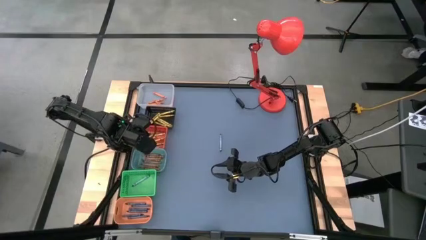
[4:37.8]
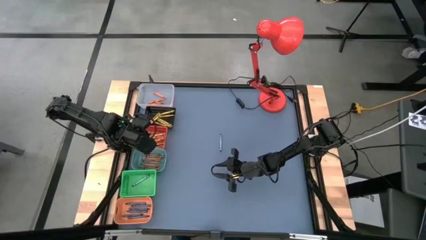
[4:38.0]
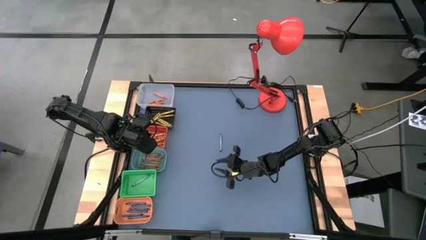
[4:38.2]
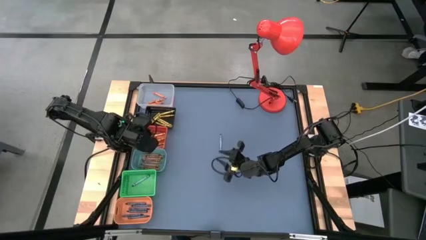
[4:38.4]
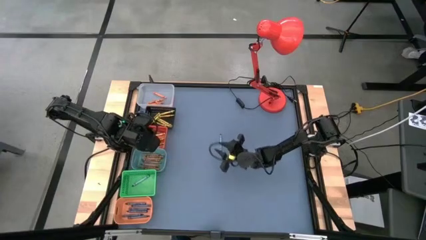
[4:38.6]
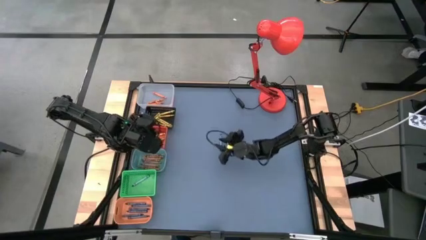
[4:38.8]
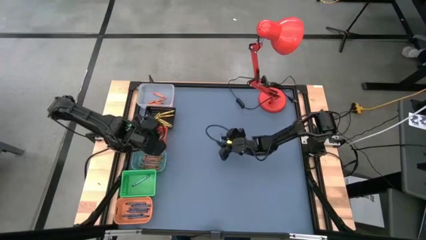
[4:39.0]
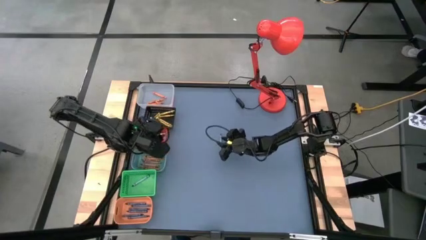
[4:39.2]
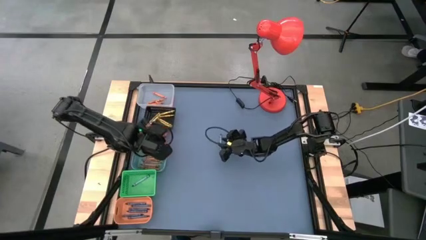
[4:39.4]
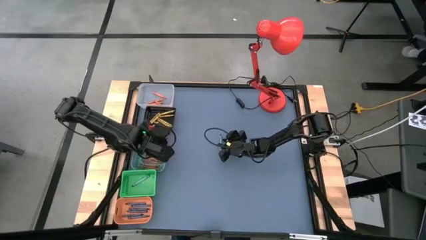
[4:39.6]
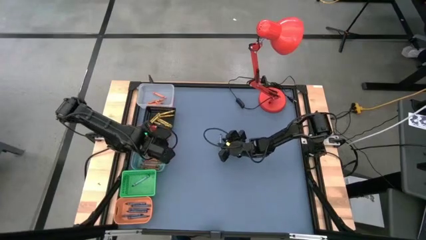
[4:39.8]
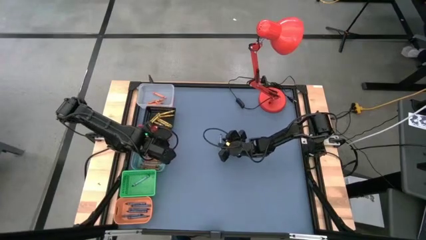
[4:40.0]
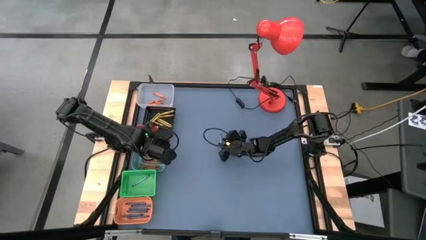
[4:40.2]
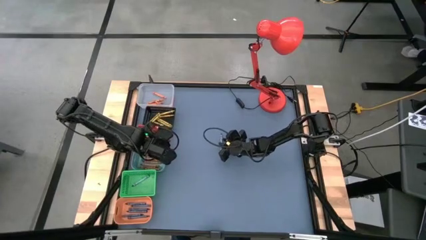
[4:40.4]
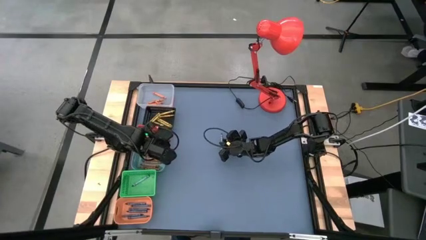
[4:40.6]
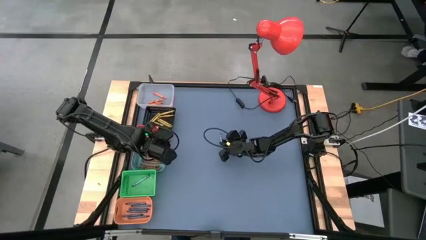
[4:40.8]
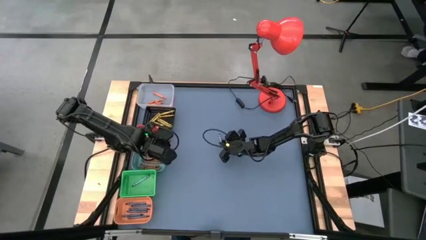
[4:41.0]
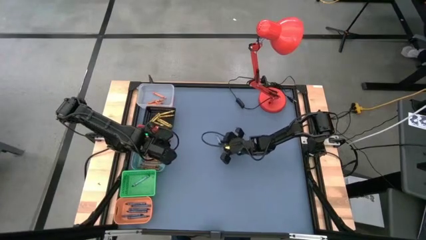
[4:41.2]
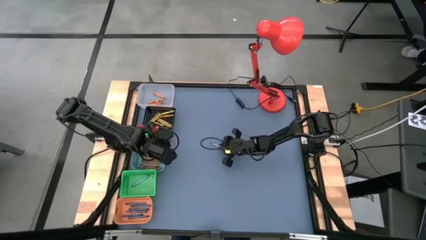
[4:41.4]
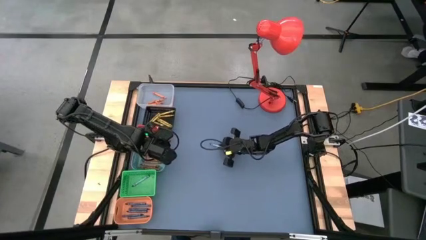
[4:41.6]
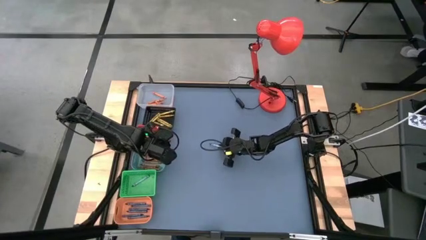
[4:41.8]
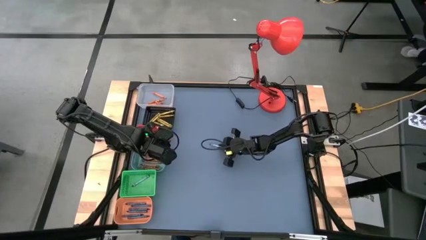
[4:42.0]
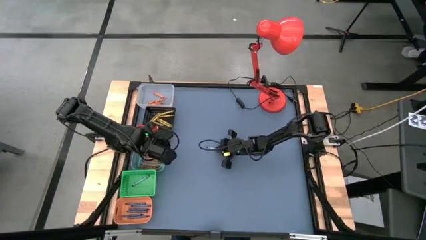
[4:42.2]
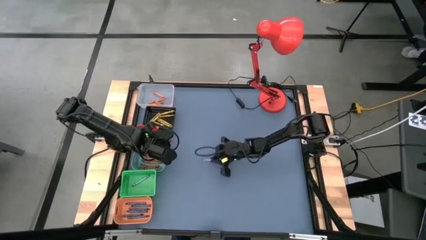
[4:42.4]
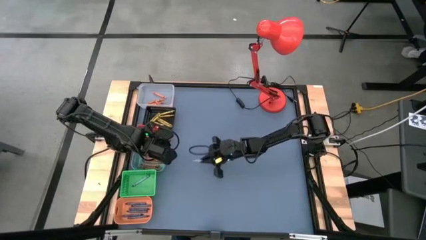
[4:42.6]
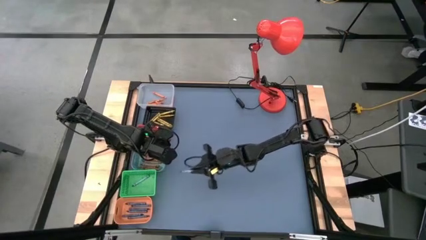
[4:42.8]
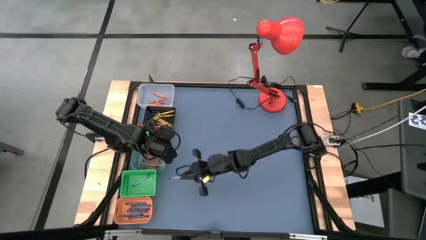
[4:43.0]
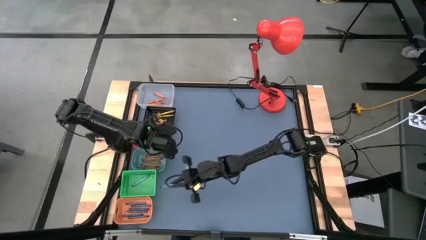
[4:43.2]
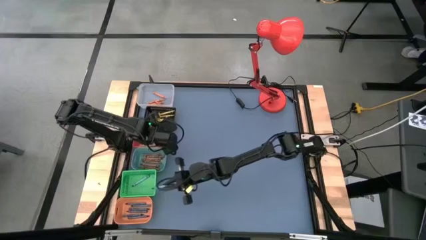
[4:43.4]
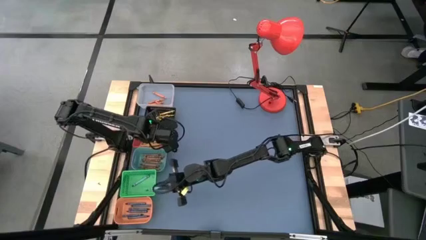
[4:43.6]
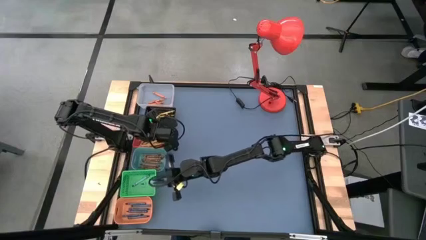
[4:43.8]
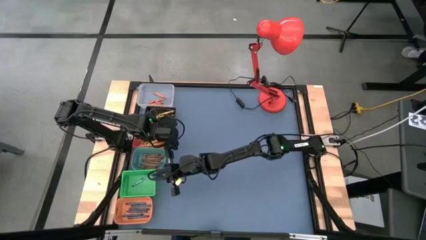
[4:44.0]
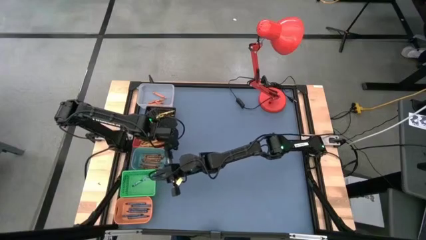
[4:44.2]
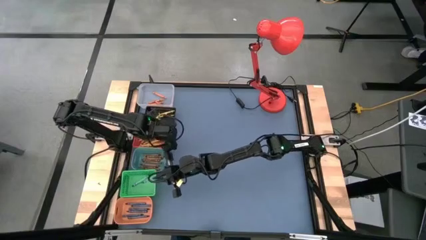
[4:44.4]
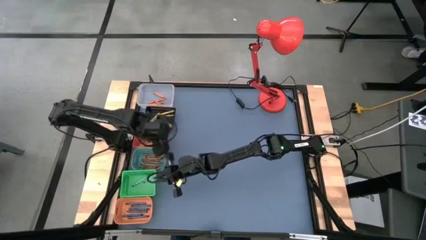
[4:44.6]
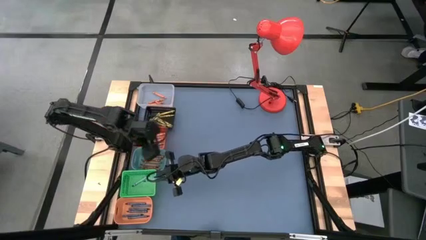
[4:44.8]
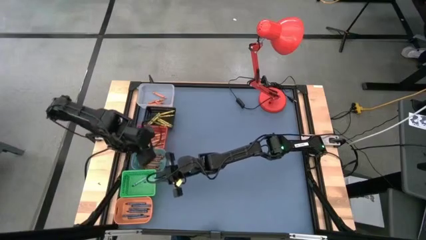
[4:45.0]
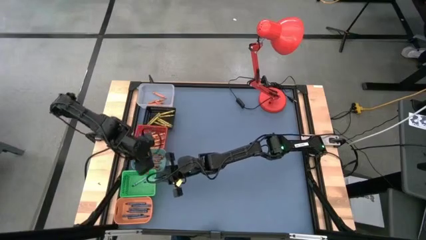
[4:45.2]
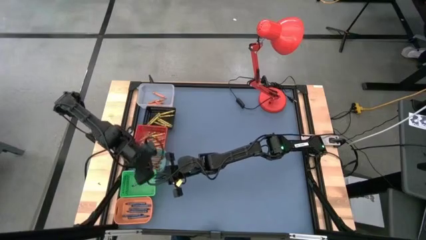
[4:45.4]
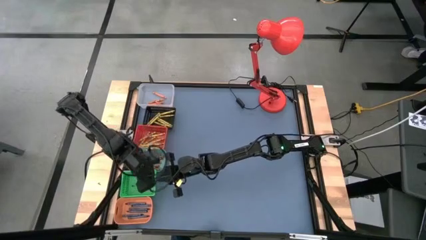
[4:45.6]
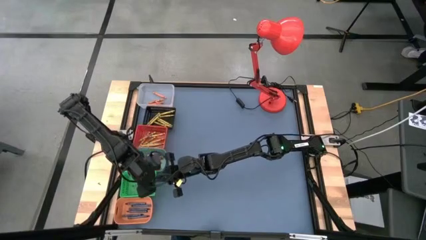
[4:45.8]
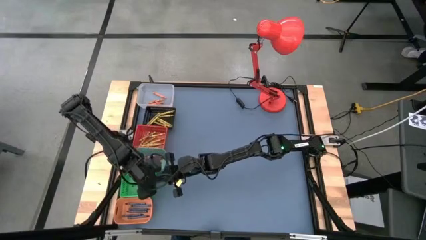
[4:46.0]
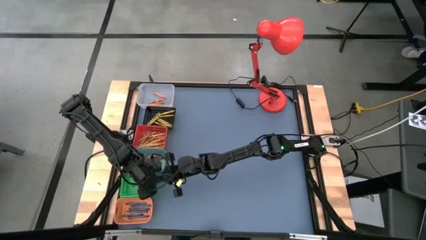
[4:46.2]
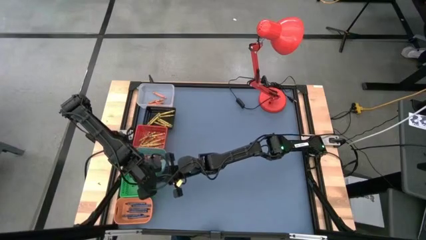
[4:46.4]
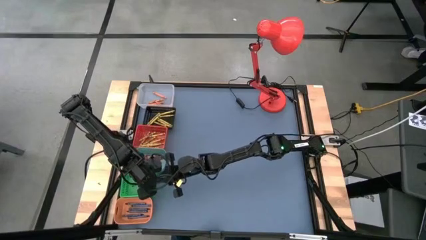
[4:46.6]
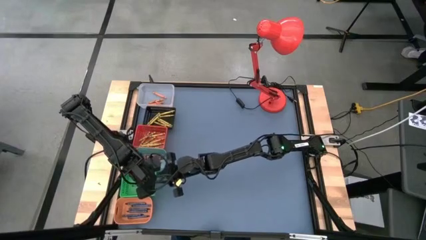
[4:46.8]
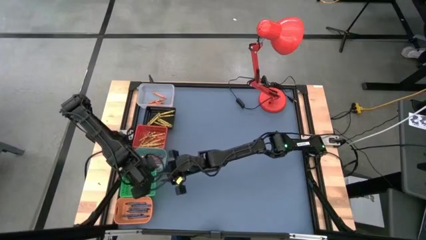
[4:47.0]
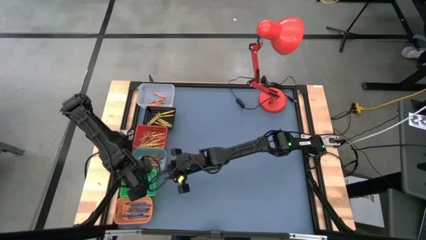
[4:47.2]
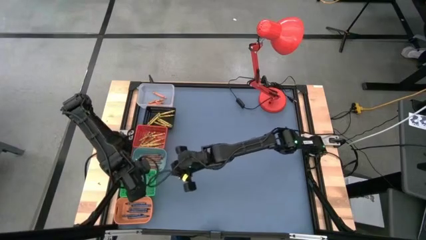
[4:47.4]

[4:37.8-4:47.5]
Task: Sort crayons
Put the blue crayon into the green bin

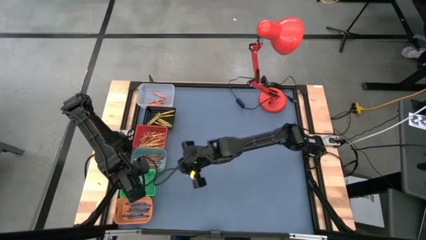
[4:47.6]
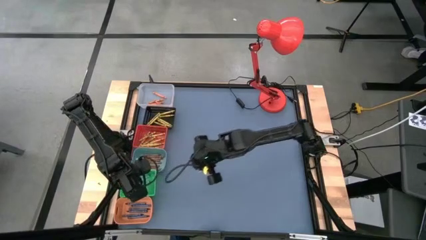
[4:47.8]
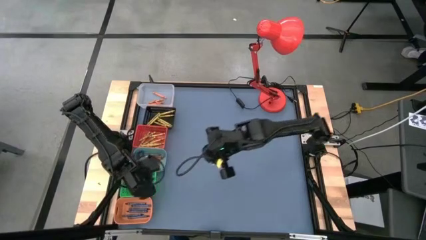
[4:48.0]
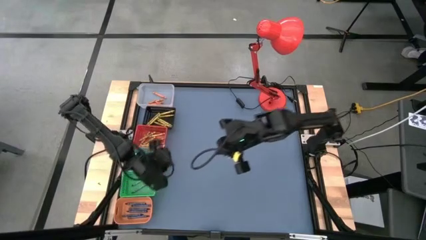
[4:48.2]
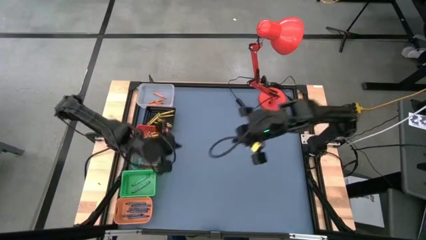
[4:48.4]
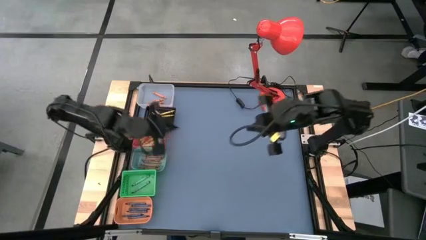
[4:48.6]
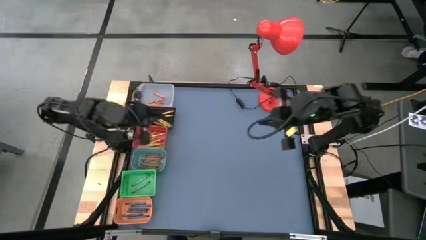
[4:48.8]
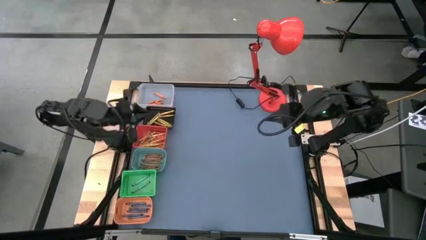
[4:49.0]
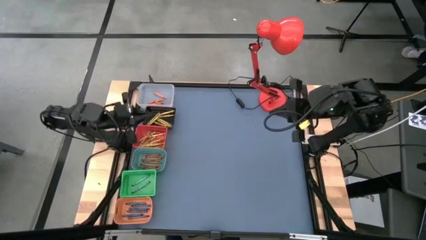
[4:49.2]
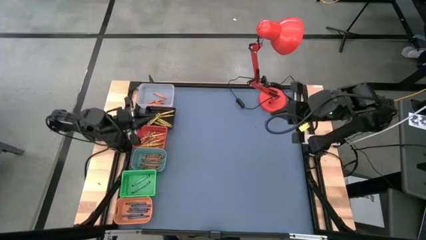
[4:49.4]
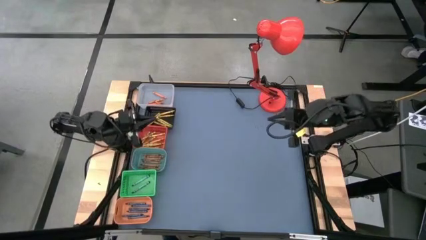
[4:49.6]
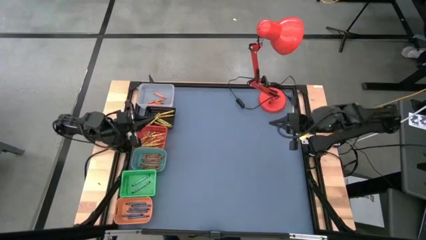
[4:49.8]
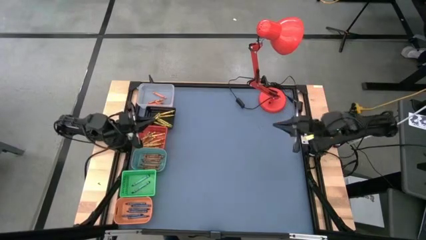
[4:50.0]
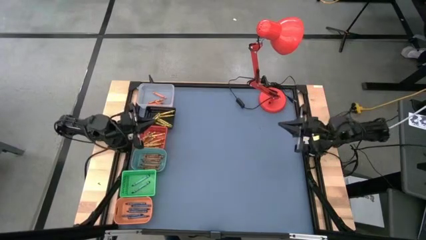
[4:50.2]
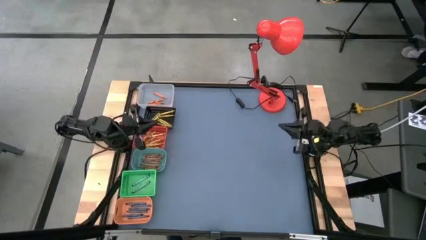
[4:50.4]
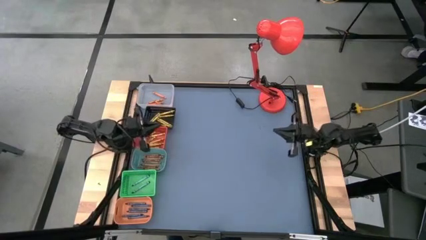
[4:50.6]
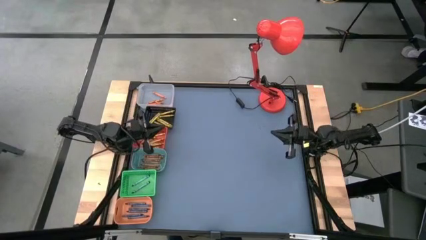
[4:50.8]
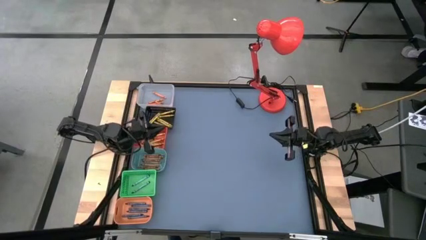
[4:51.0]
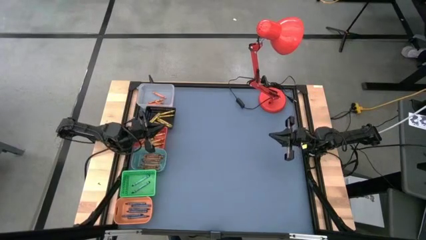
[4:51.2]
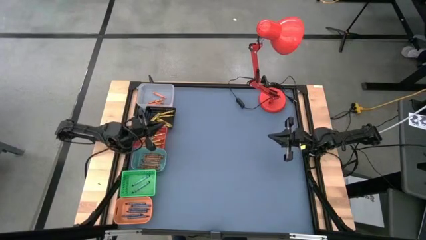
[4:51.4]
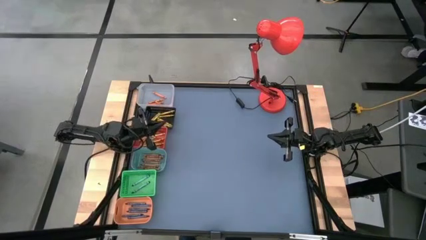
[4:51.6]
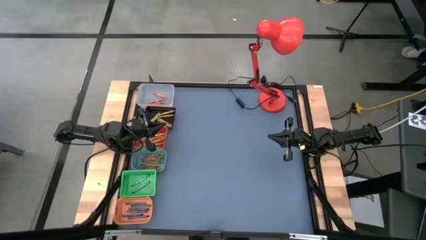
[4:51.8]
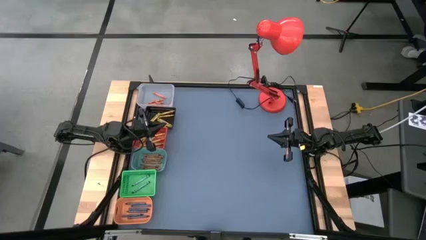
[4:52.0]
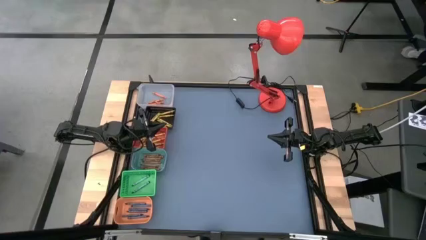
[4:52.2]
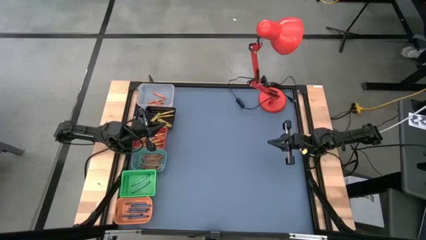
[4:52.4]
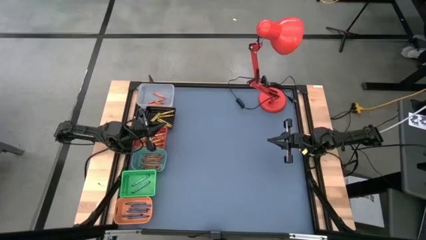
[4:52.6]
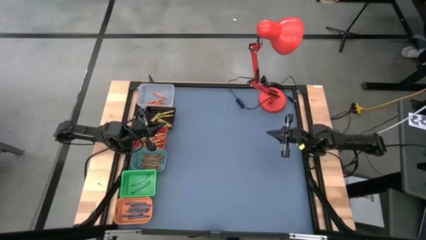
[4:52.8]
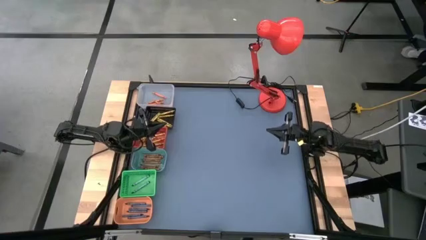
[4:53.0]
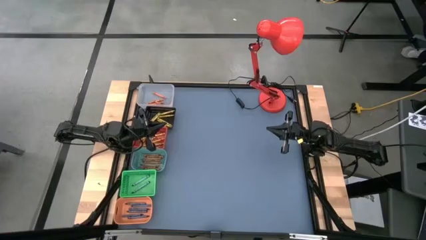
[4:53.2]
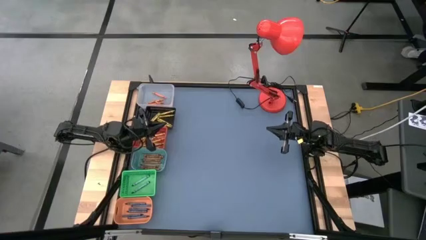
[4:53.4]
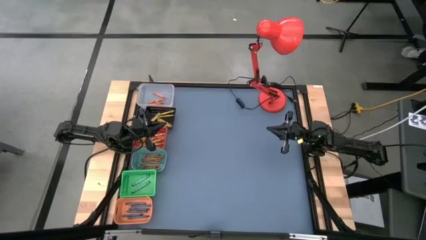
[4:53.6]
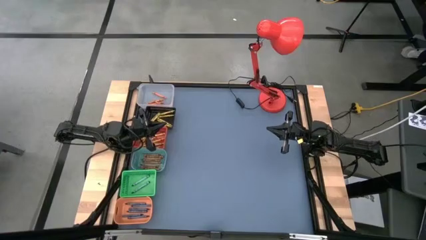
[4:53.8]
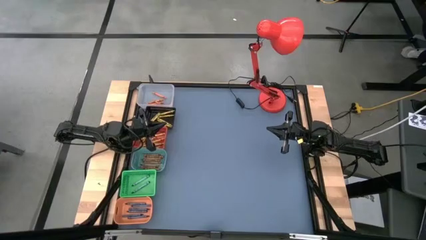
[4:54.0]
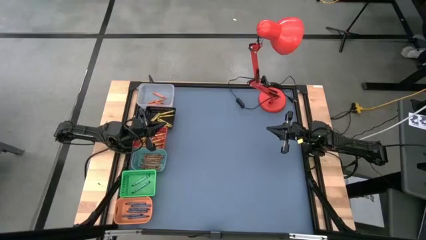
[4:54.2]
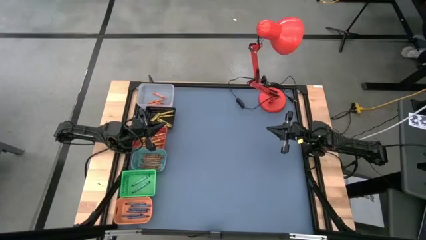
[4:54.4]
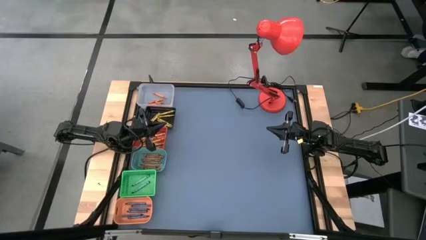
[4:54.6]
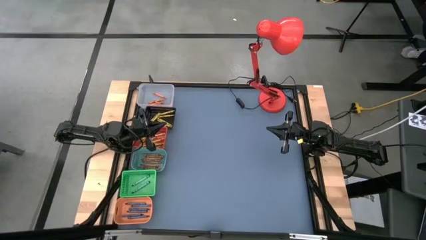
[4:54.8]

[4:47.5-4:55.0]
Return to Home Position
